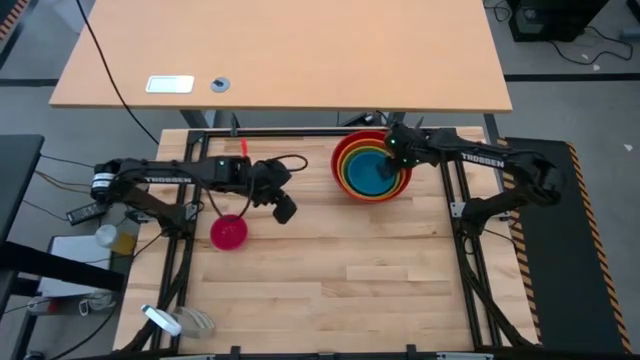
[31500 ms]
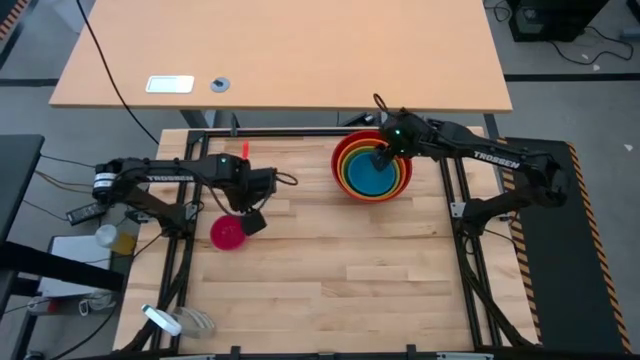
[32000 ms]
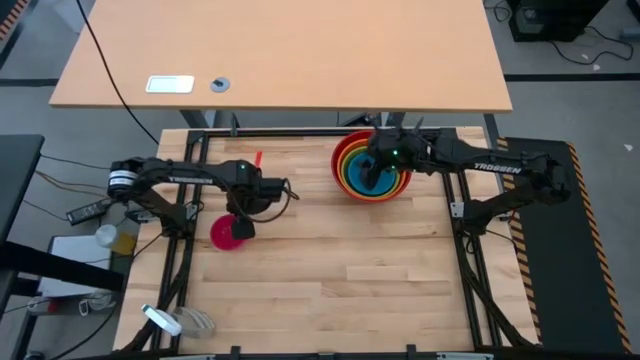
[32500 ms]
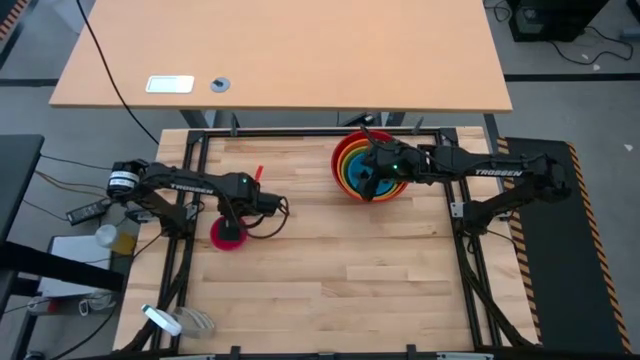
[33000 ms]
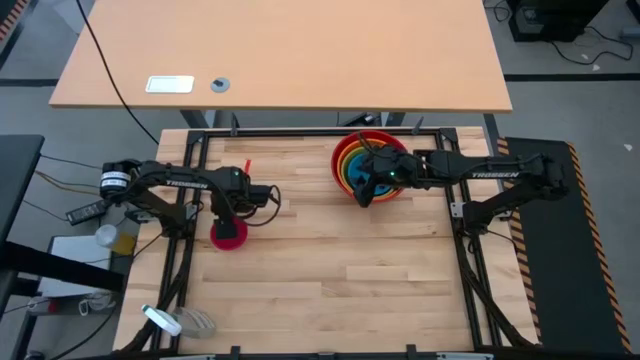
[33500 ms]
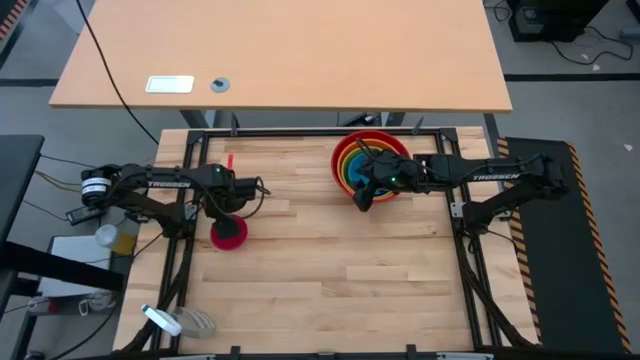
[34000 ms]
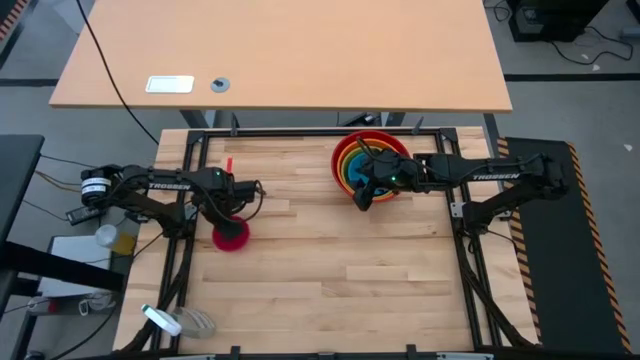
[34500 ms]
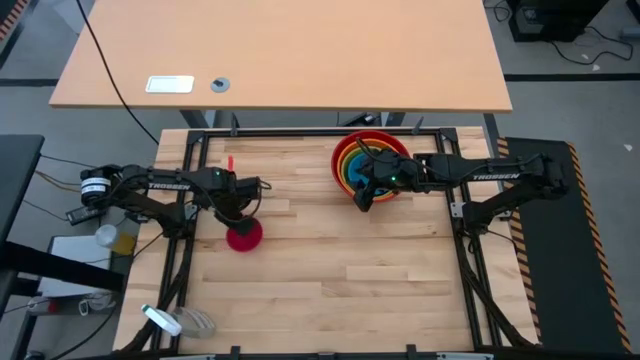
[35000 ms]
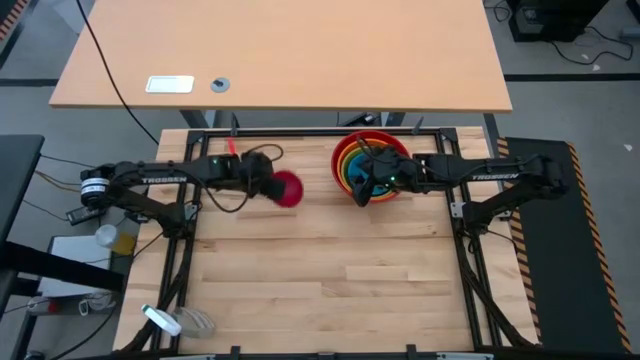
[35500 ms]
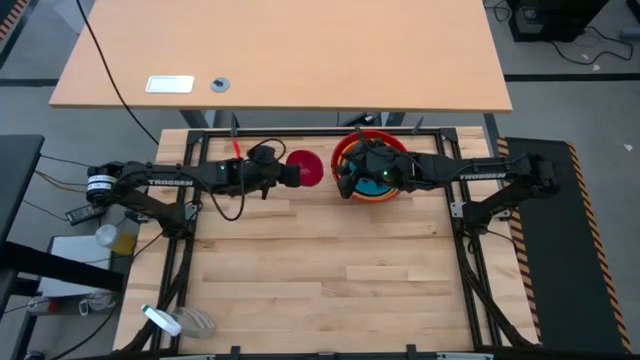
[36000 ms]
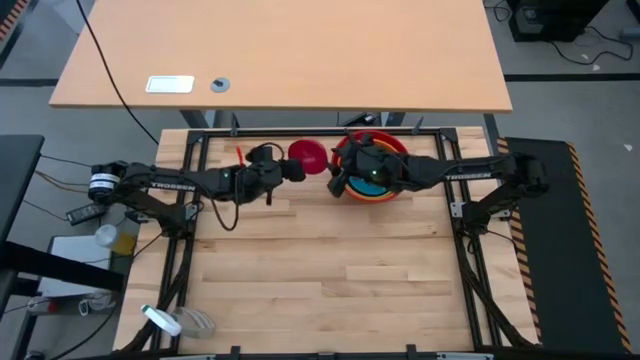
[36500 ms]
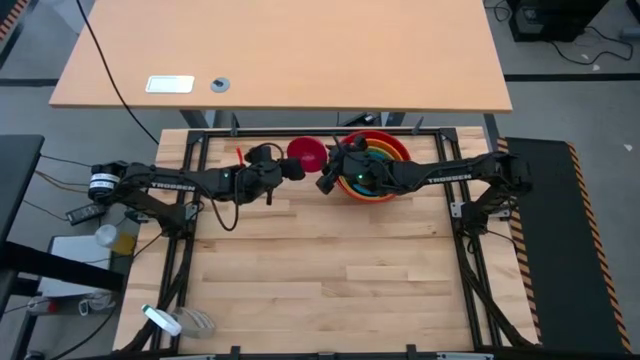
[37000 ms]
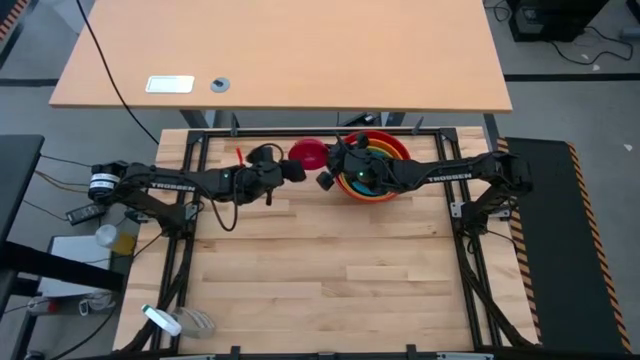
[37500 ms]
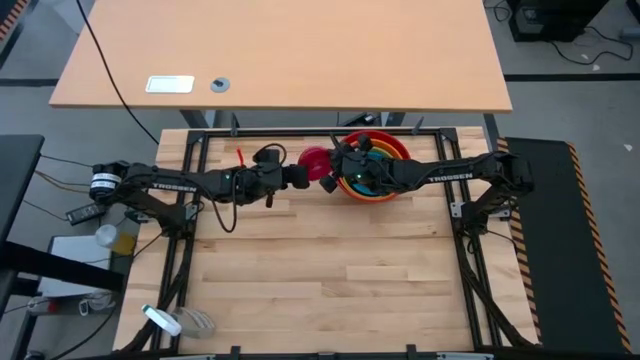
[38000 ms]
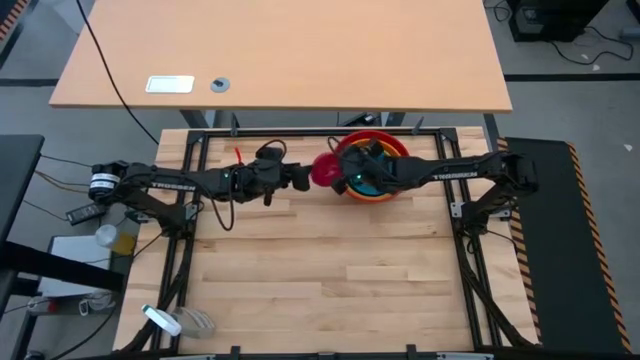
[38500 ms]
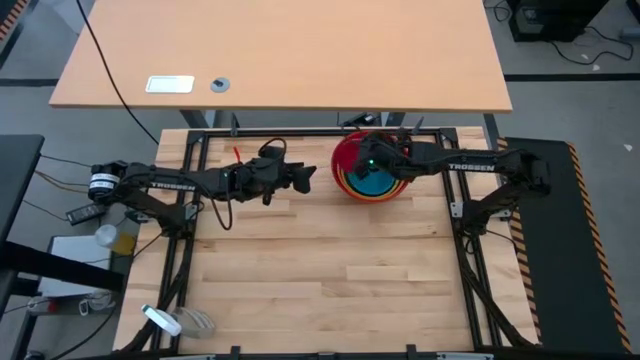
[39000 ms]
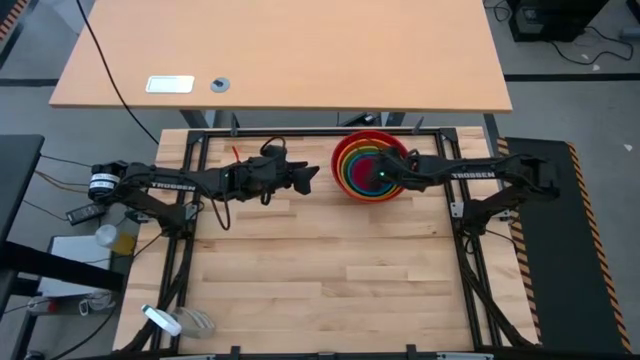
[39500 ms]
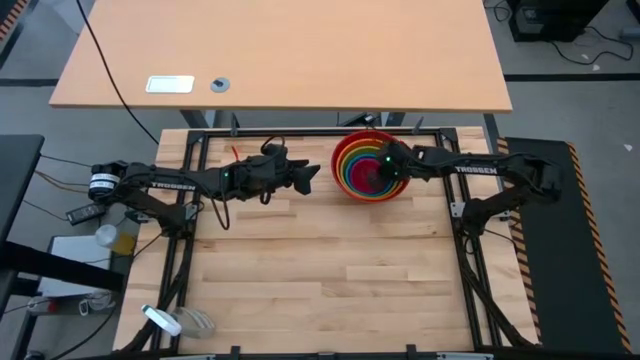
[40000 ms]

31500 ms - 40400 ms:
Stack the pink bowl on top of the blue bowl

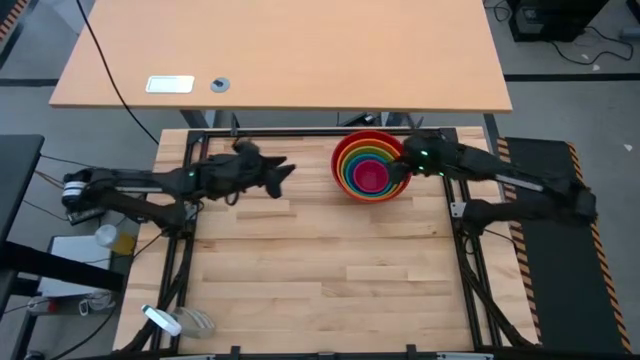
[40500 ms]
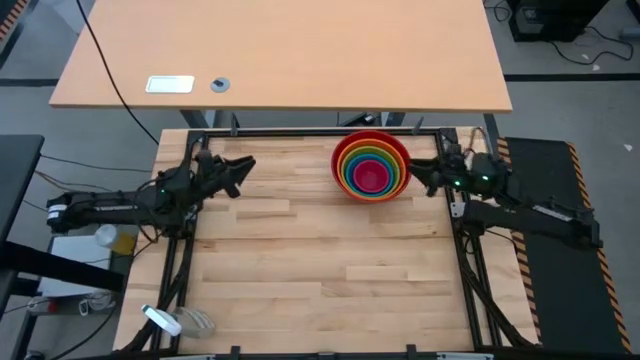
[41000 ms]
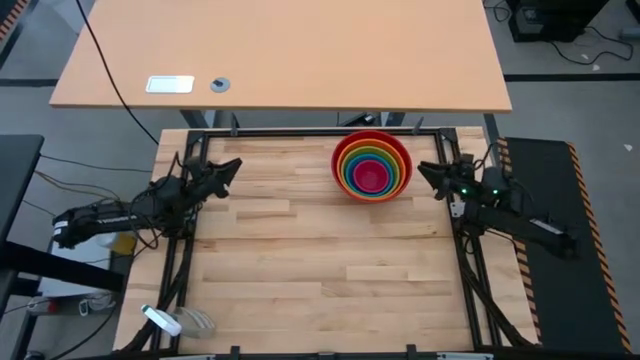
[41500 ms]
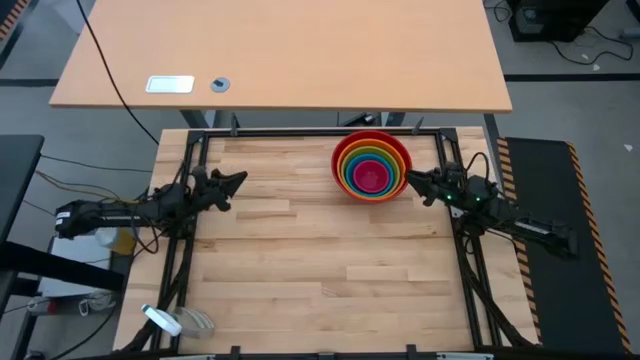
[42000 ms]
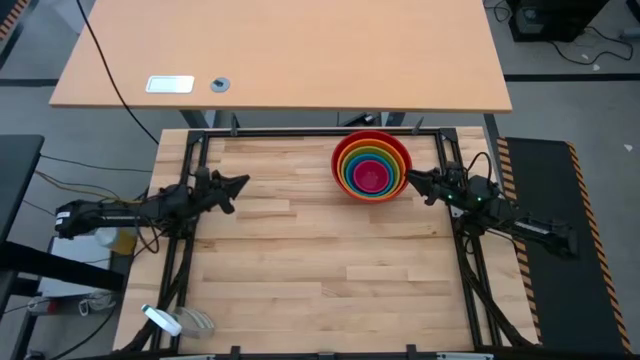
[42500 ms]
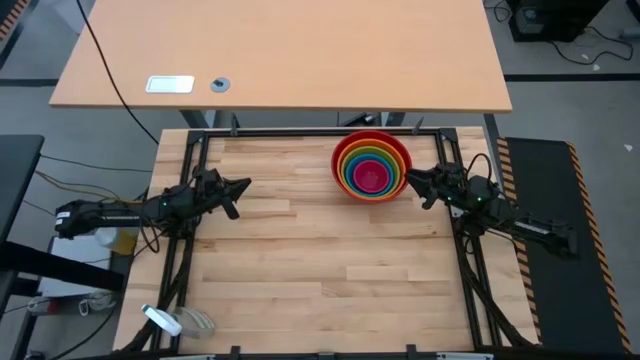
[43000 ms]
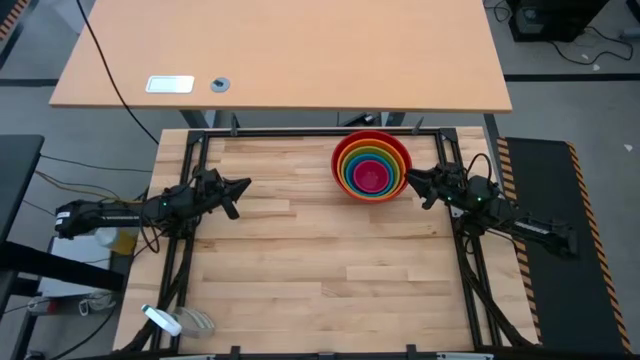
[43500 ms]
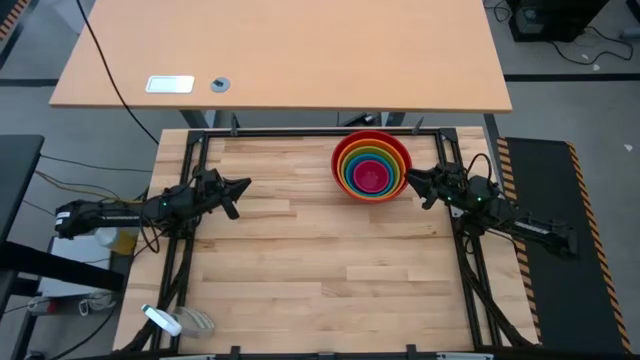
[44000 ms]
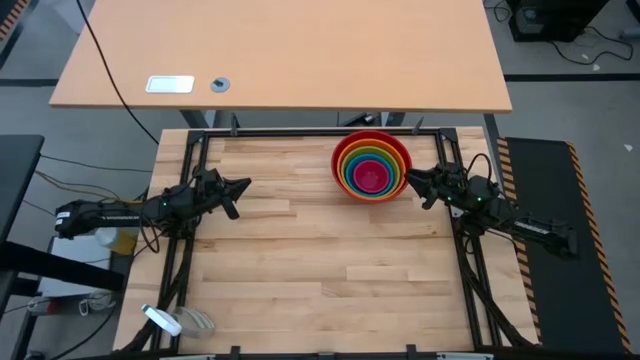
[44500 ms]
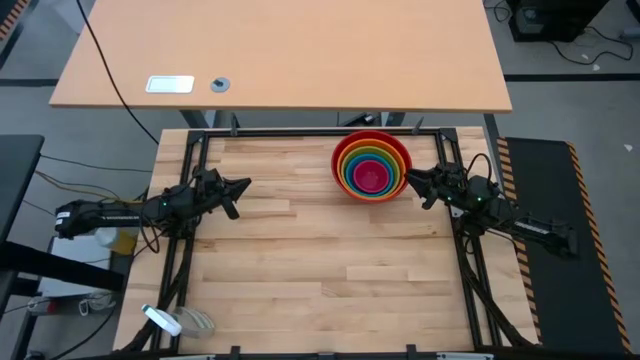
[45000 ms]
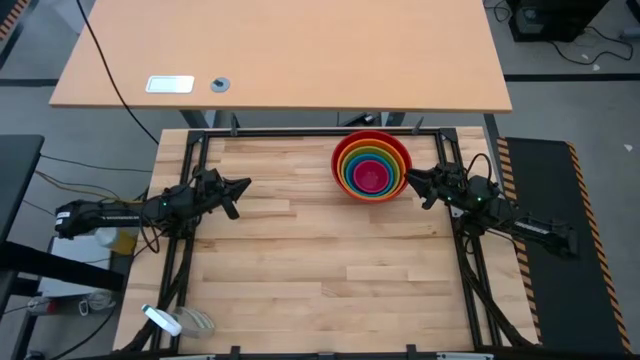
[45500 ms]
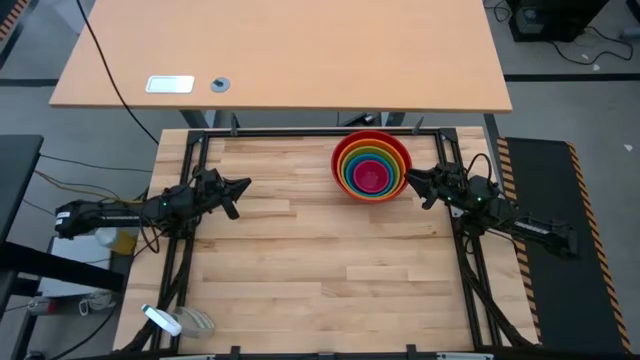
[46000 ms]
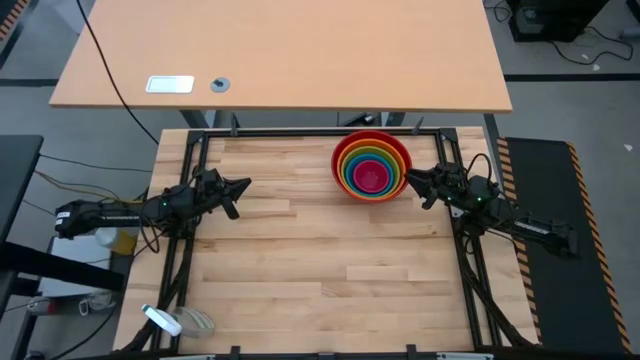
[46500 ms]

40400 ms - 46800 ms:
Return to Home Position
